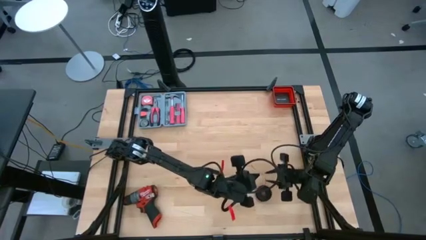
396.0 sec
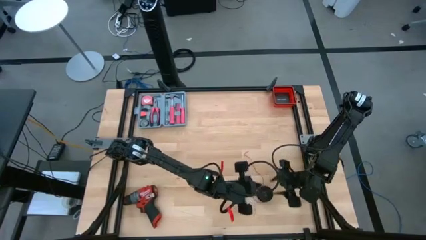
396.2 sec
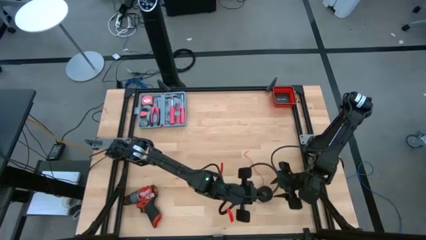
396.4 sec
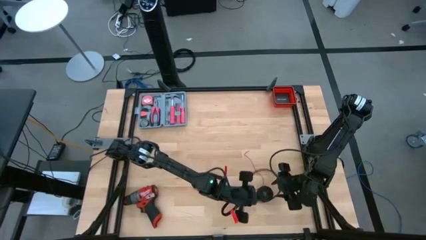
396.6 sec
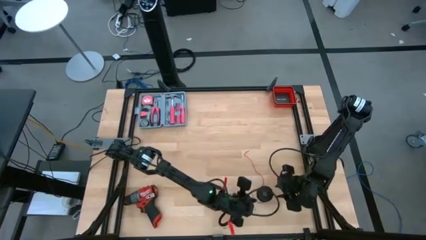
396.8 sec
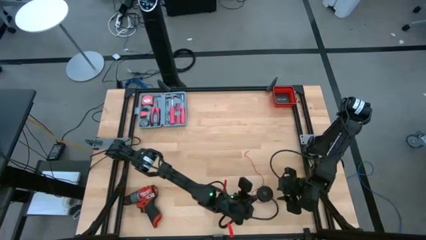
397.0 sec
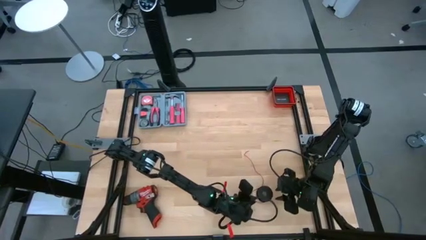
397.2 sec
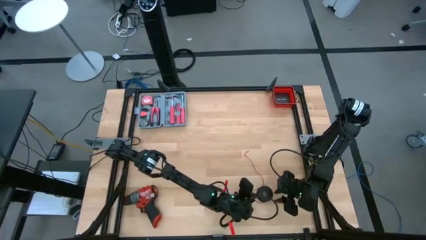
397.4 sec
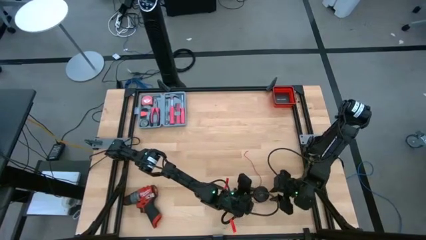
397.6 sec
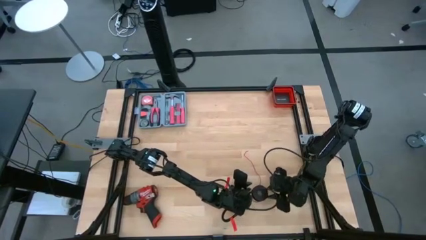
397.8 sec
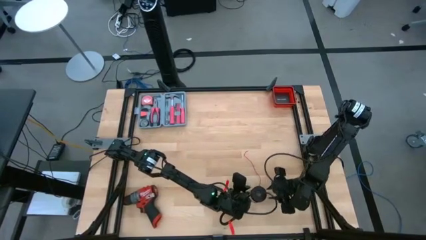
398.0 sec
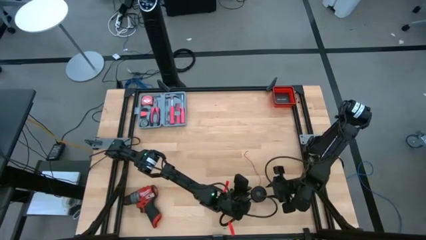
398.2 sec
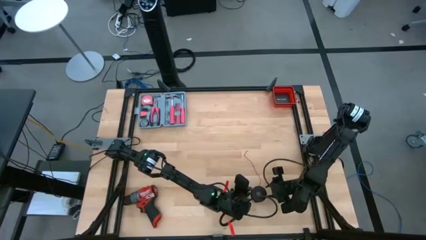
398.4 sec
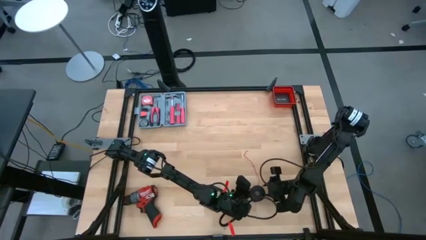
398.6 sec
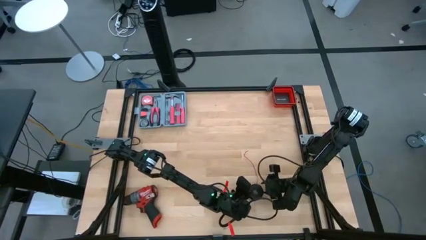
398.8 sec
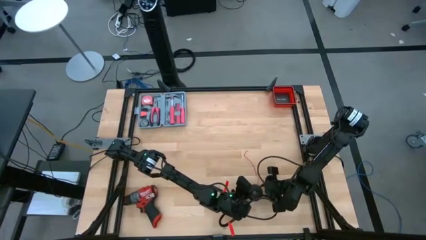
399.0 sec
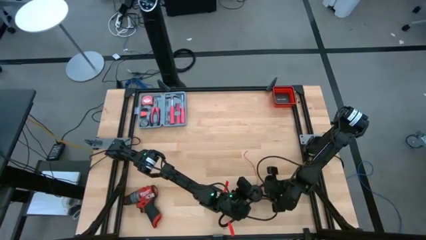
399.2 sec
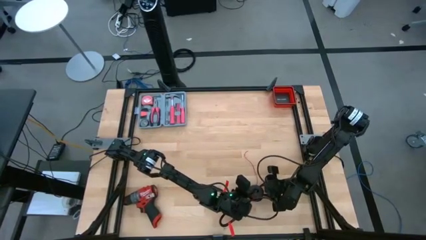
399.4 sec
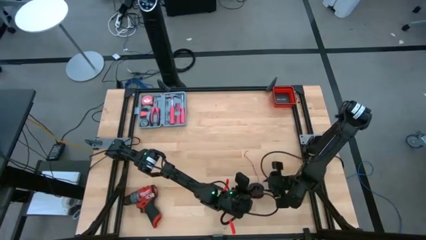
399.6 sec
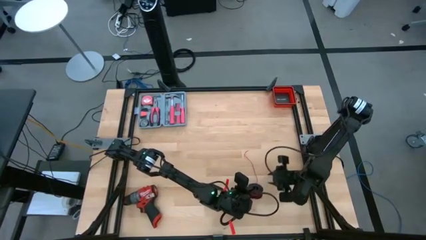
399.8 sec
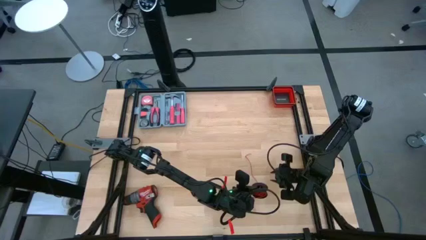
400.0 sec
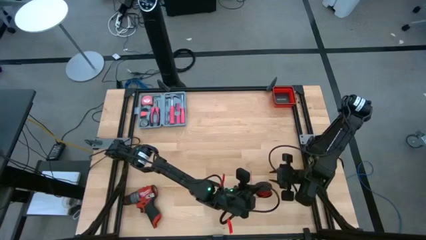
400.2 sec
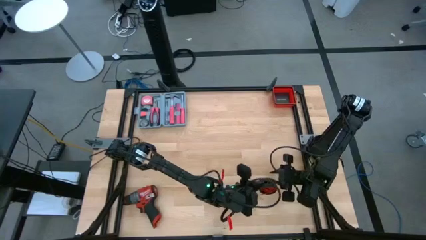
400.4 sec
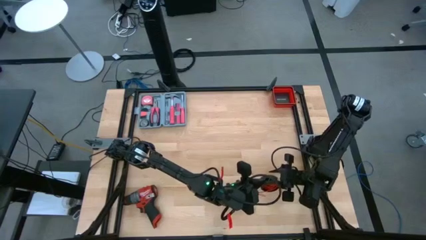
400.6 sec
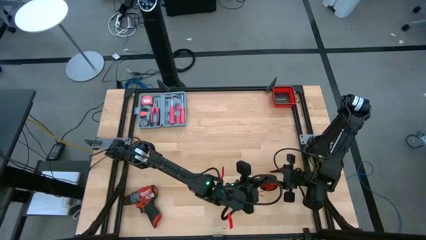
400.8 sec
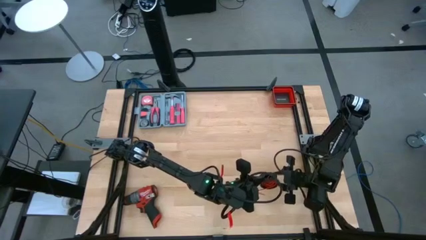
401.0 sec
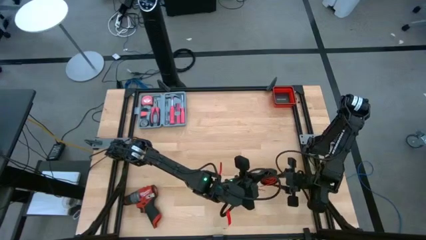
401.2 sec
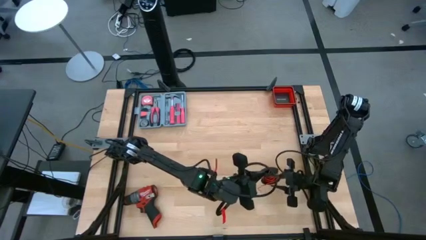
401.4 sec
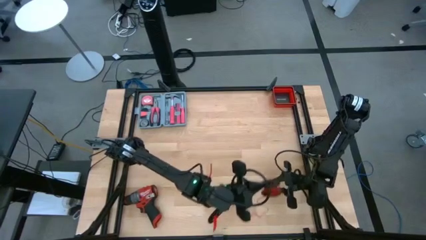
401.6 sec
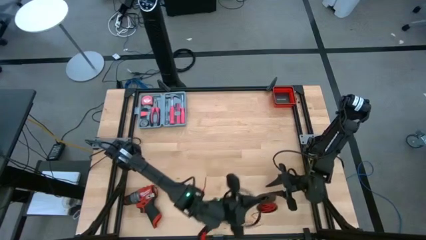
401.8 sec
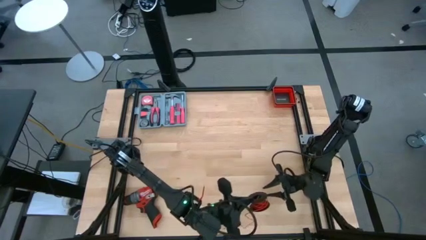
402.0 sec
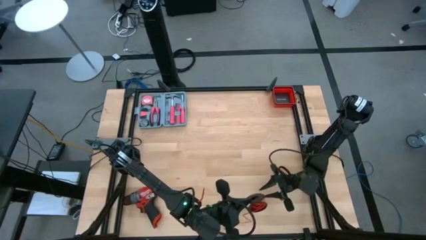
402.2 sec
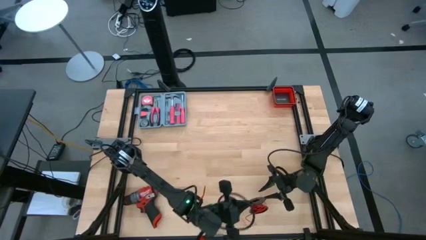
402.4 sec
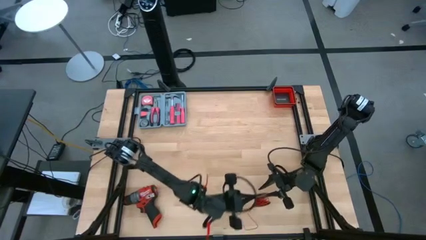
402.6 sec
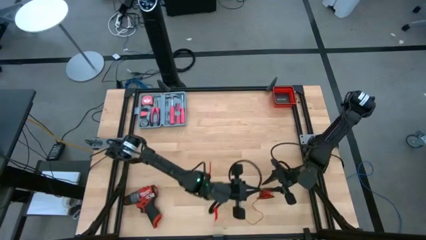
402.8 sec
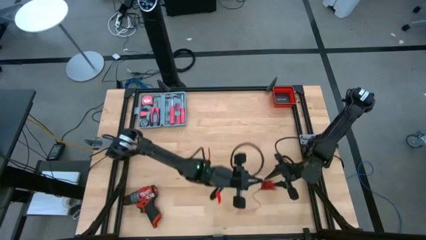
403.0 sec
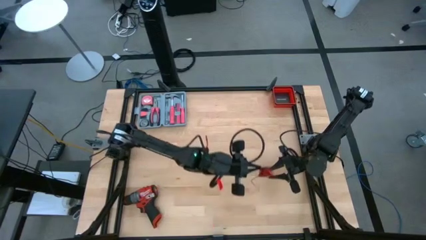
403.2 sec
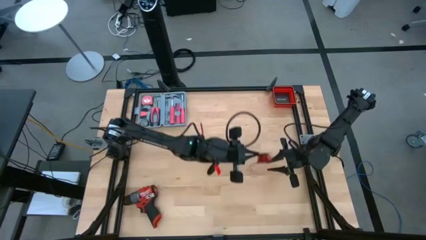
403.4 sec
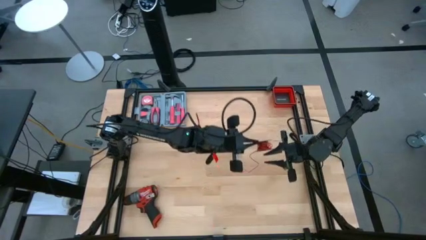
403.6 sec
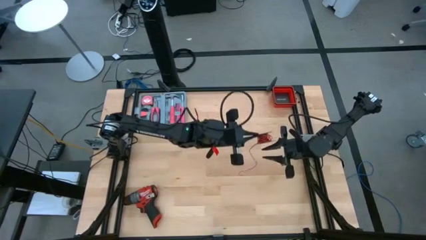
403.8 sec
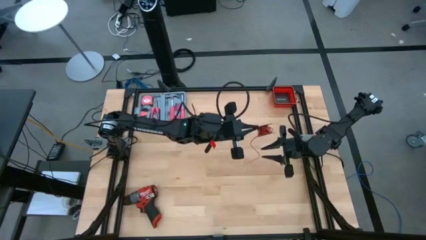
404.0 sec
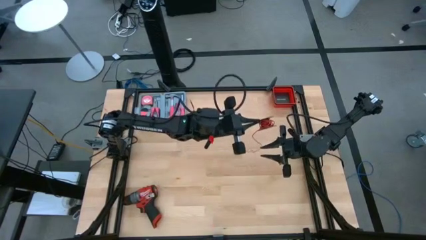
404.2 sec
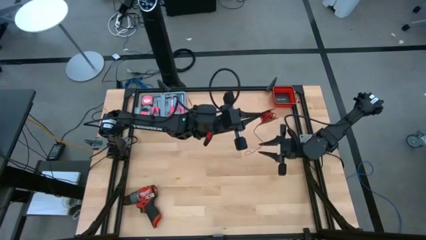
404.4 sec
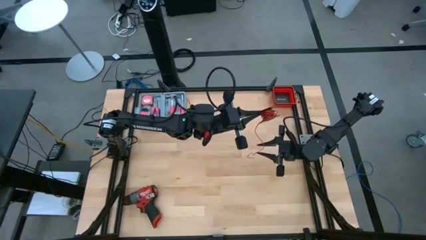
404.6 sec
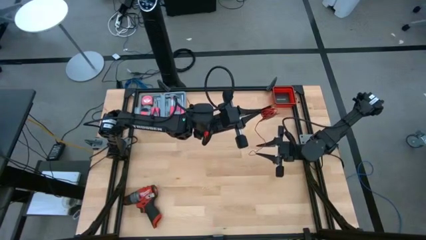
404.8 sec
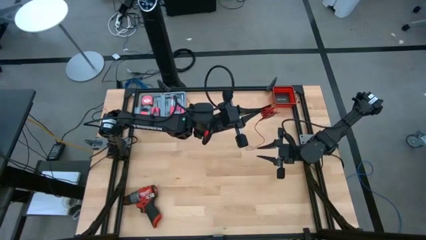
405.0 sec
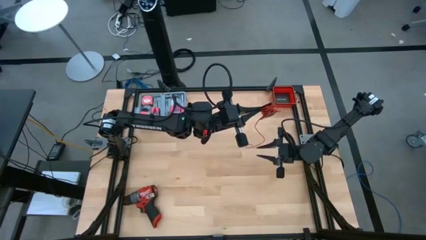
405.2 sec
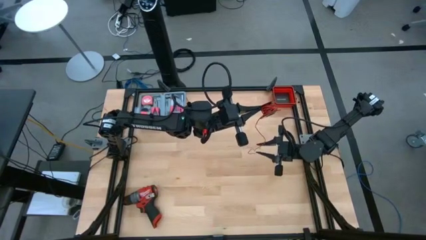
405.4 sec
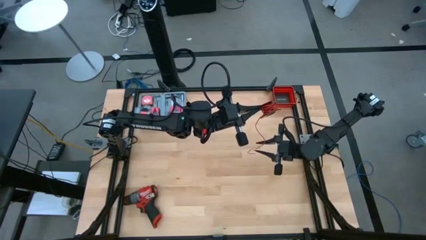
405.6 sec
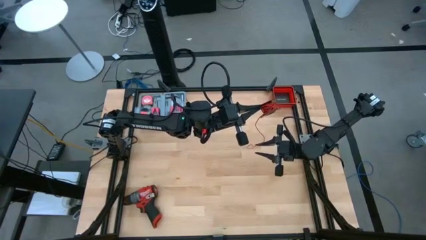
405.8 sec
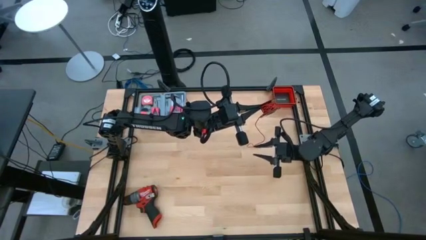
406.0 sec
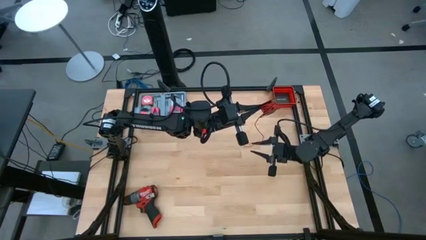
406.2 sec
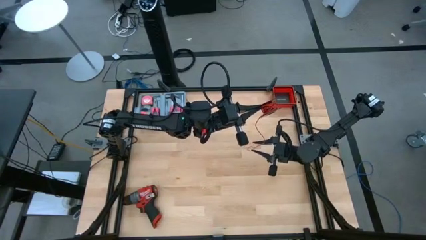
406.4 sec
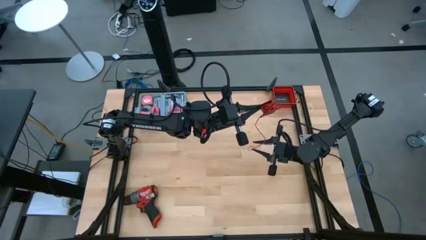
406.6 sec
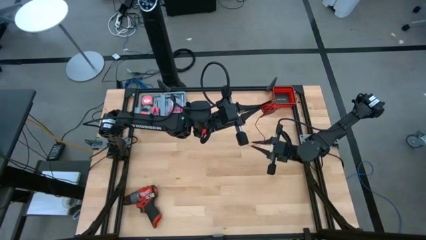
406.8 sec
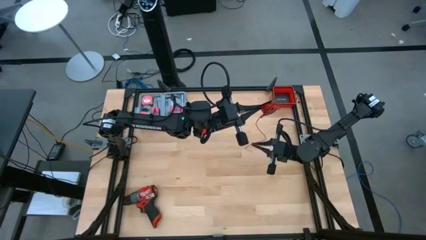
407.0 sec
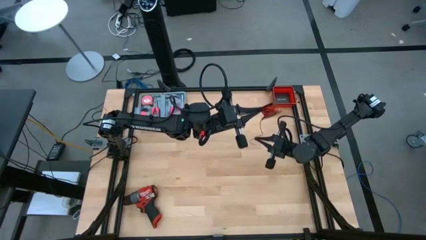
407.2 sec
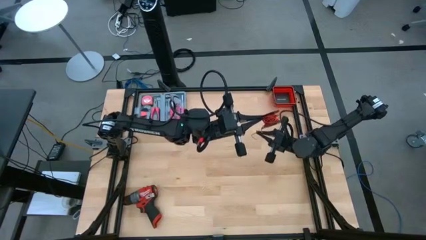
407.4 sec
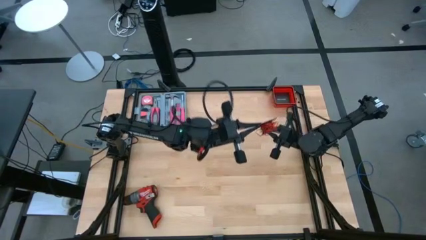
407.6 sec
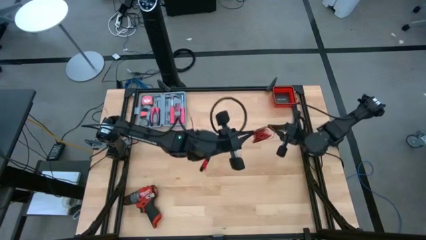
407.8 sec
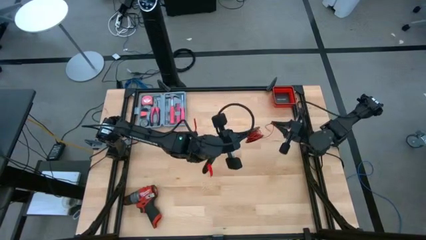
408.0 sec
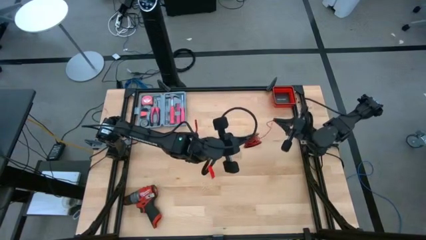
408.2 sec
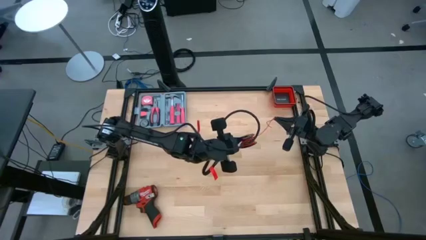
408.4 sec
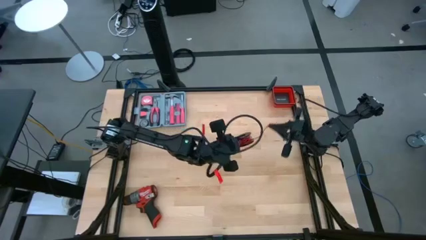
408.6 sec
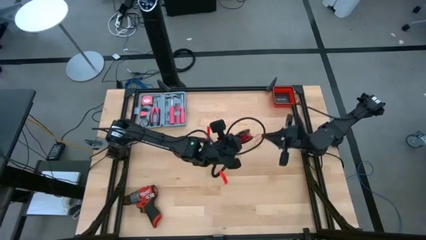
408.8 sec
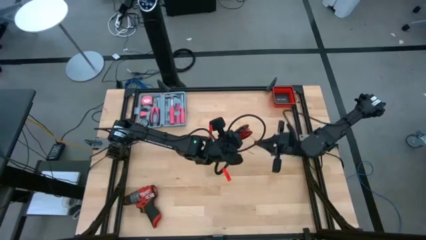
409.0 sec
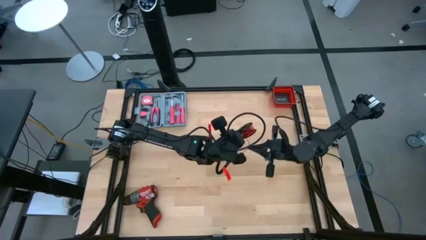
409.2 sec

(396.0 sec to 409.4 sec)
Task: Coil cords
Coil the red wire onto the spool
